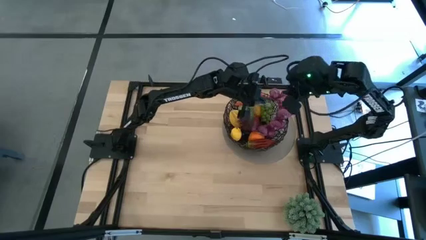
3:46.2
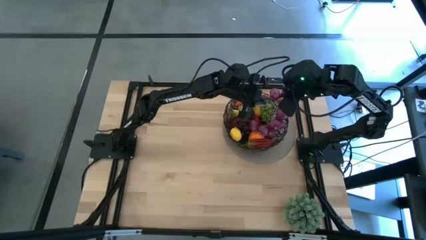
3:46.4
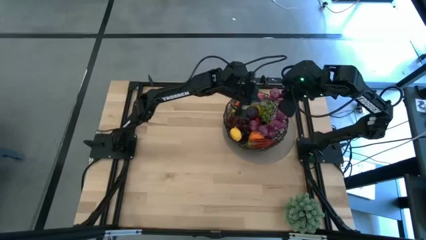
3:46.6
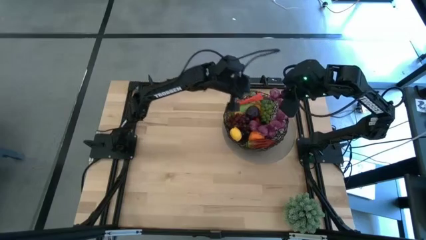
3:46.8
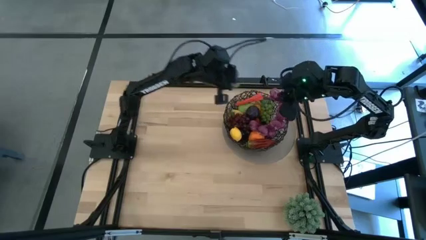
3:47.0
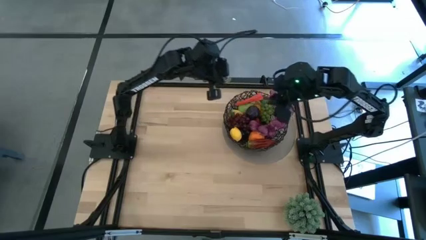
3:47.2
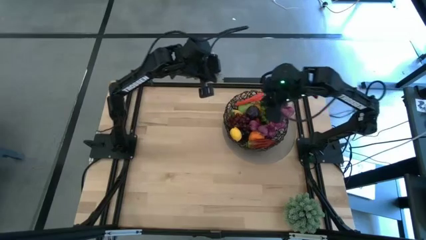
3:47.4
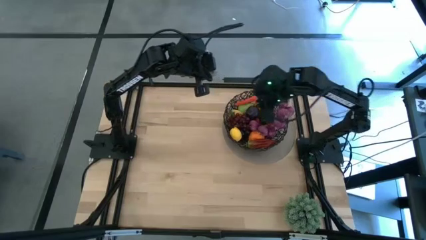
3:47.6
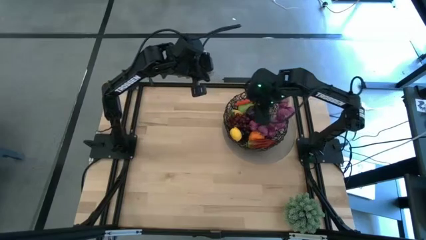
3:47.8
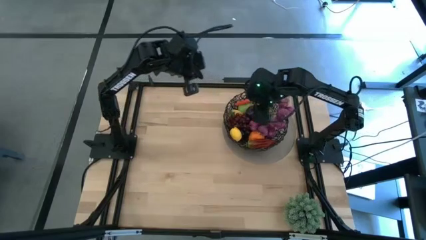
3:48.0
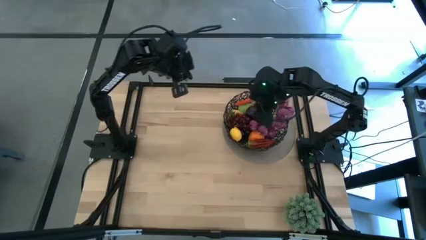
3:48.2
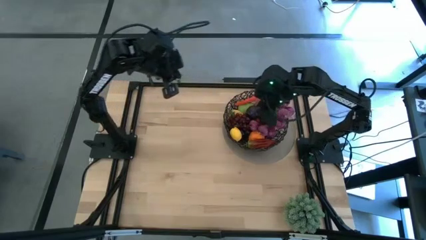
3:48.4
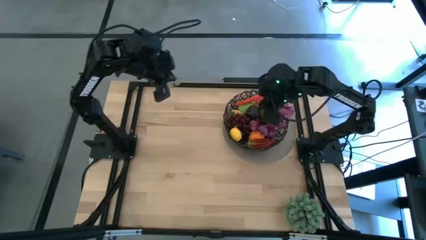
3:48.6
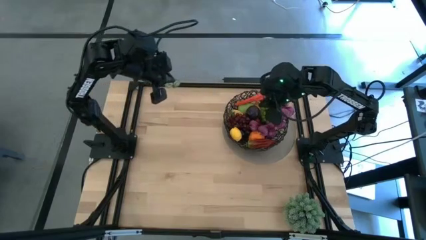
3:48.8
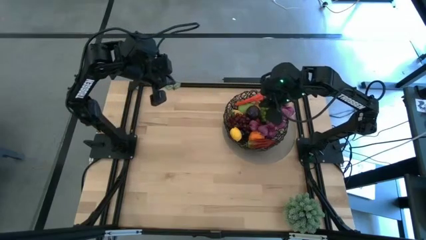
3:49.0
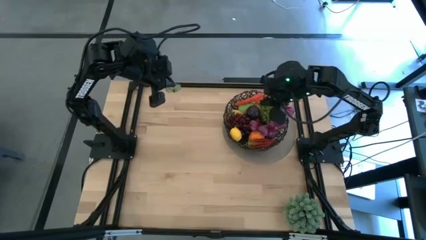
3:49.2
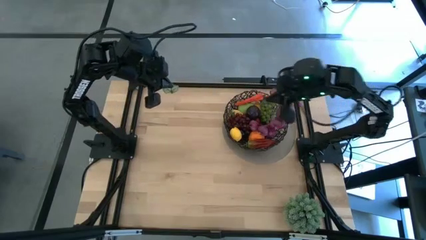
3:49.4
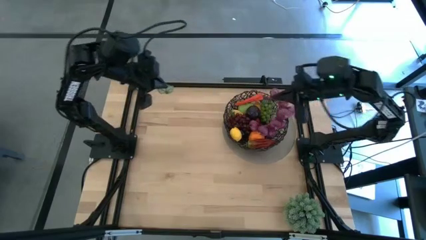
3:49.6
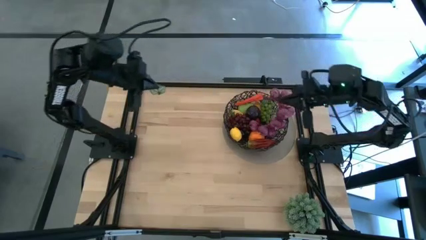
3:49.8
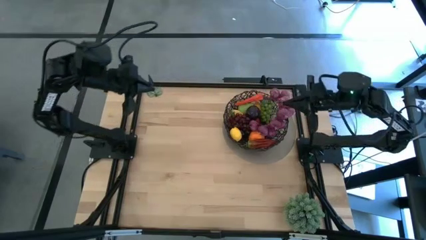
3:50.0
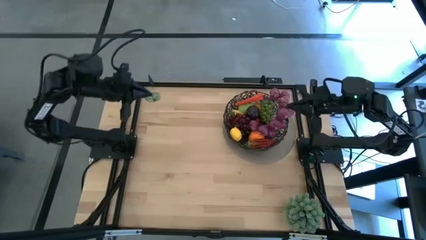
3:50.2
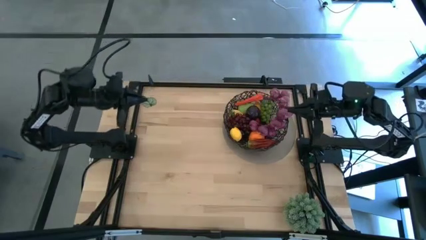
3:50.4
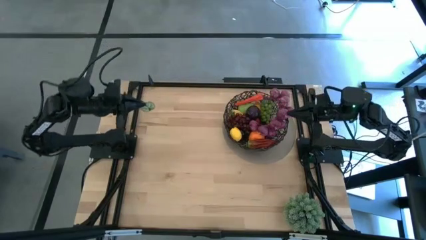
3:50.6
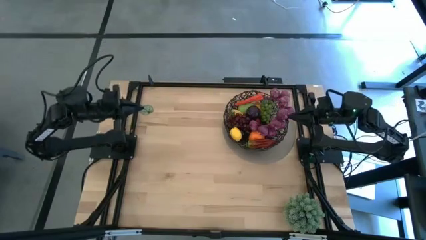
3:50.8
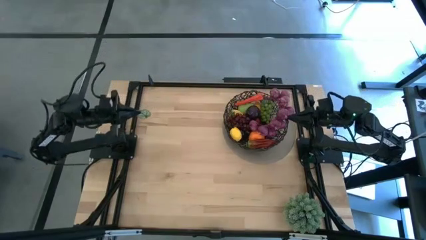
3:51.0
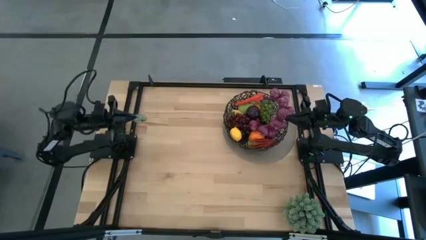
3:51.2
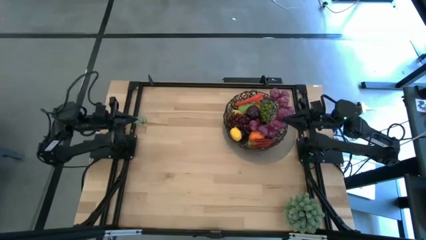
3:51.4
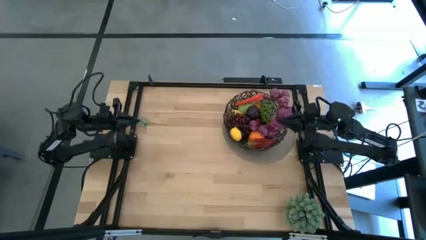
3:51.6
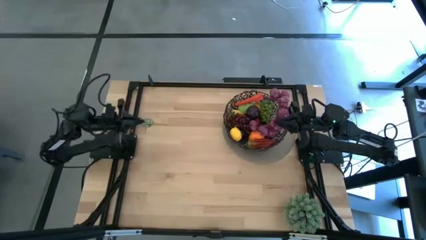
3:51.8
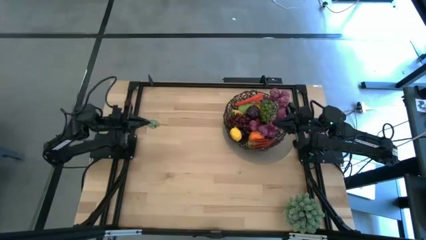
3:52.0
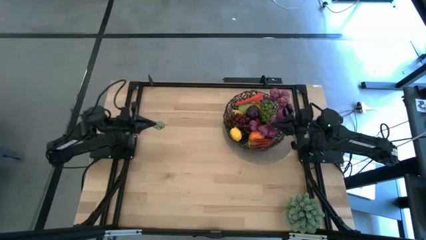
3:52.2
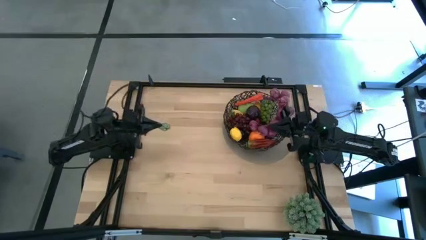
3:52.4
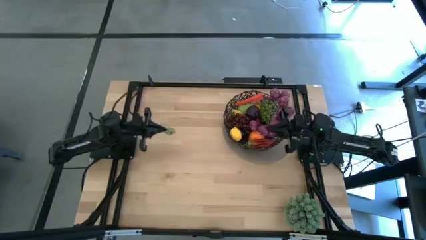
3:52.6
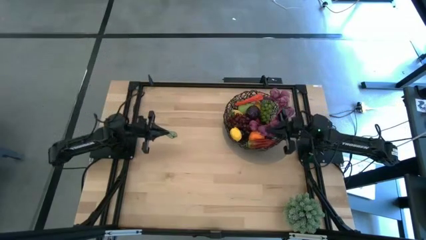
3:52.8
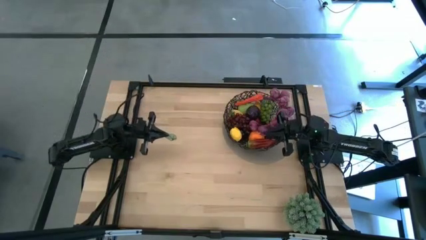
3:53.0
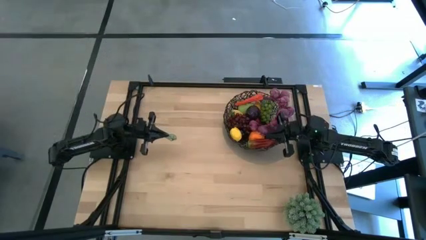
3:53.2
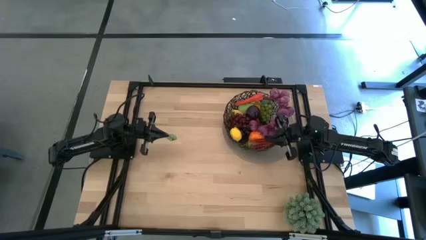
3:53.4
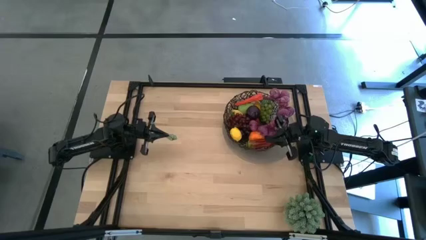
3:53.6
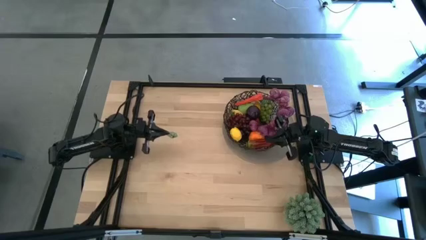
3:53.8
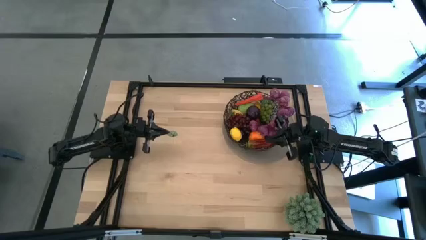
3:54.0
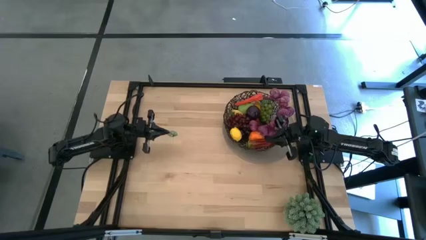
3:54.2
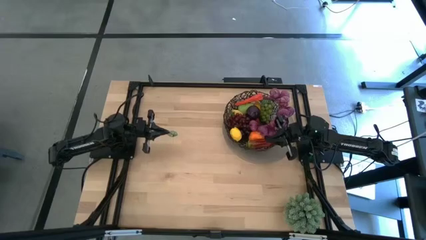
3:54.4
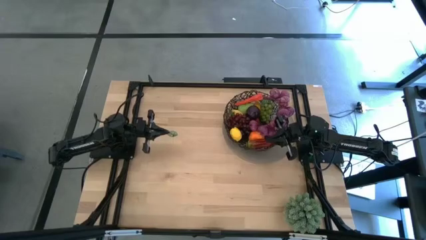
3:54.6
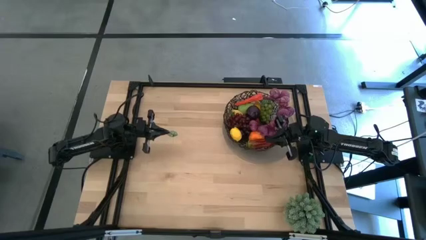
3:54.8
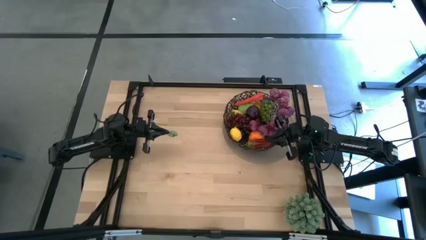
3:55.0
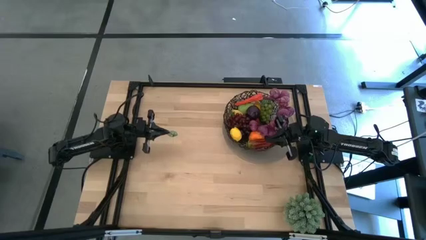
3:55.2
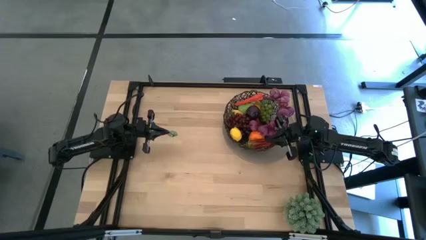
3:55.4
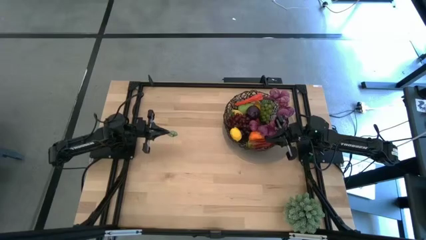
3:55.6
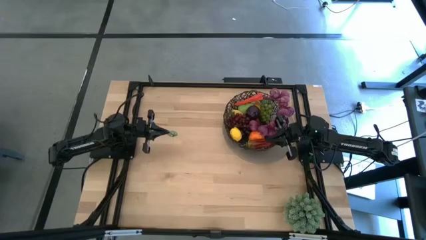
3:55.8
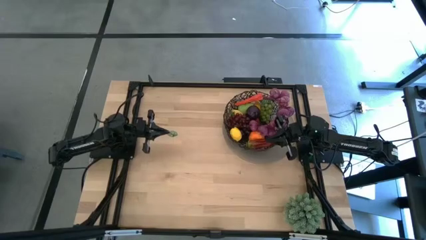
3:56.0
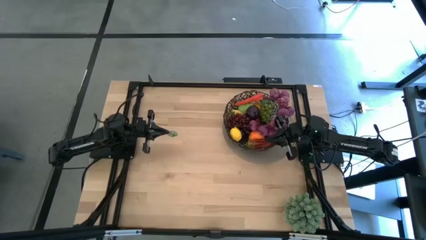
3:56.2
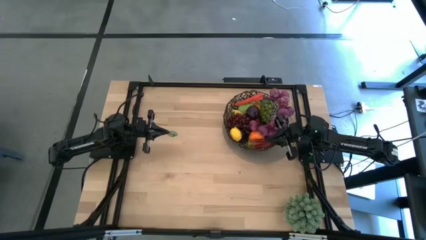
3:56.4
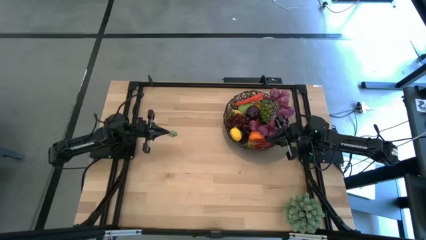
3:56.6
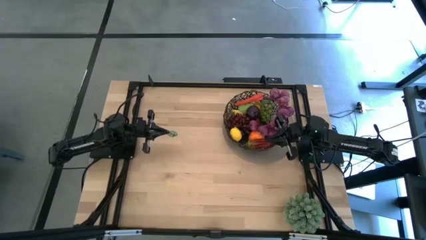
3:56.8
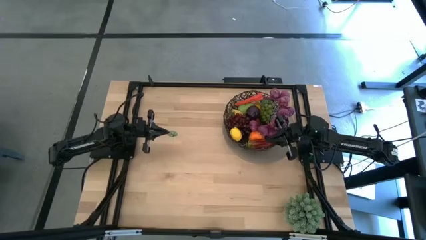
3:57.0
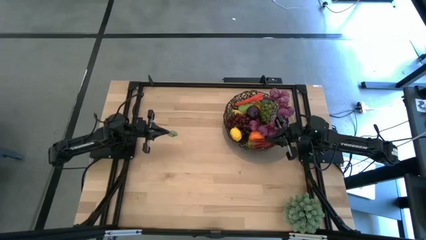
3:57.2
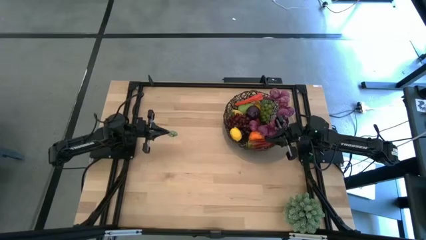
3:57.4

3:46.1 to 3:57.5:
Task: Build produce basket
Return to Home Position

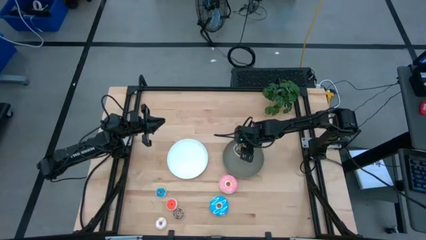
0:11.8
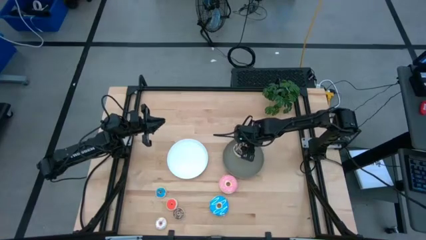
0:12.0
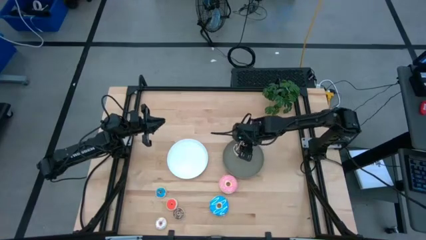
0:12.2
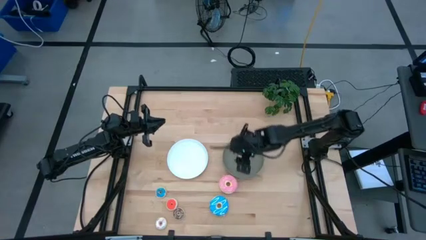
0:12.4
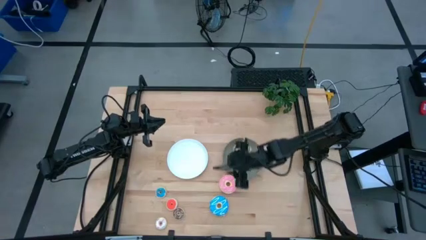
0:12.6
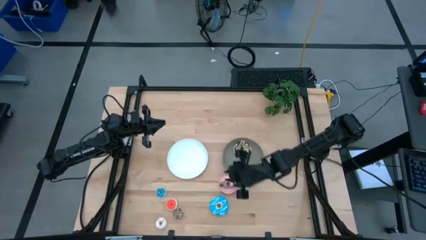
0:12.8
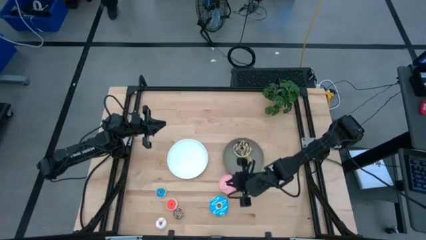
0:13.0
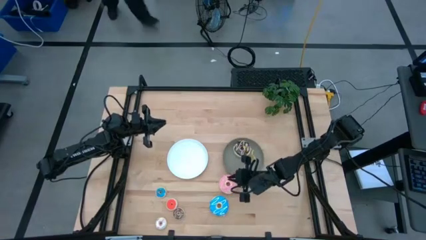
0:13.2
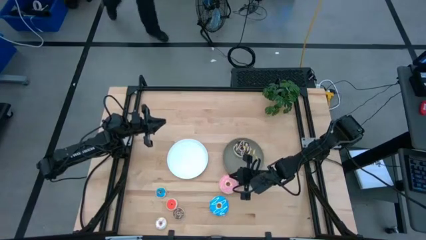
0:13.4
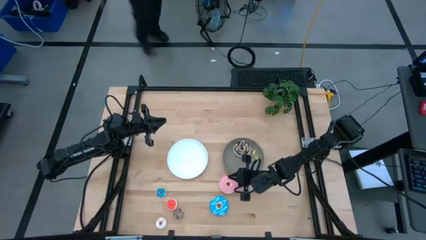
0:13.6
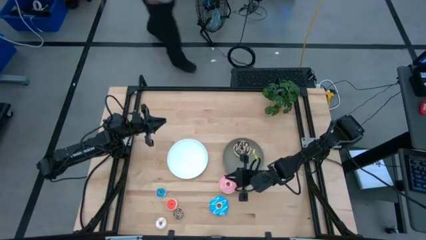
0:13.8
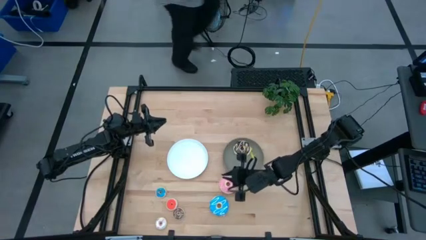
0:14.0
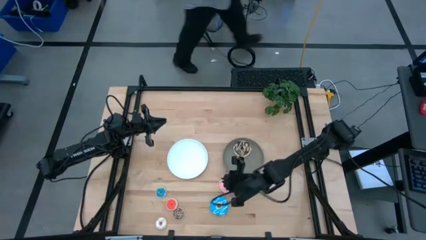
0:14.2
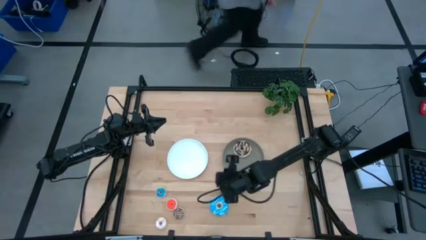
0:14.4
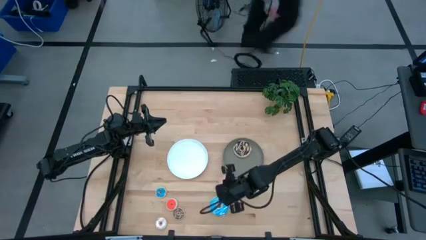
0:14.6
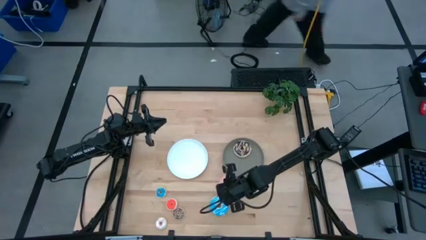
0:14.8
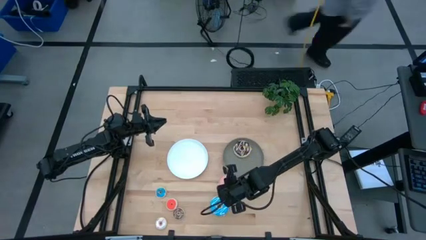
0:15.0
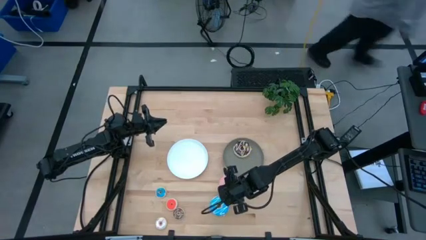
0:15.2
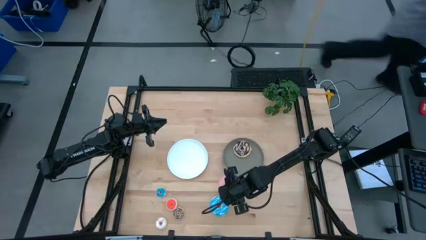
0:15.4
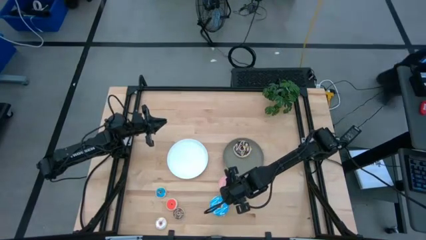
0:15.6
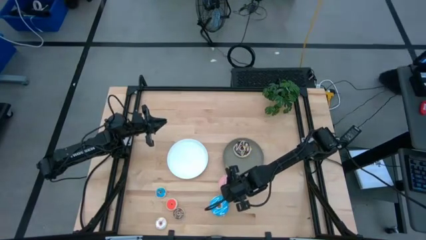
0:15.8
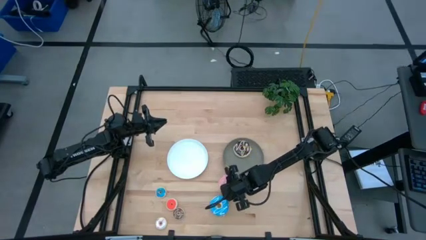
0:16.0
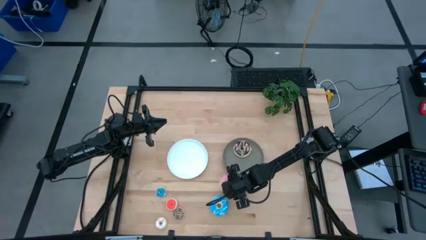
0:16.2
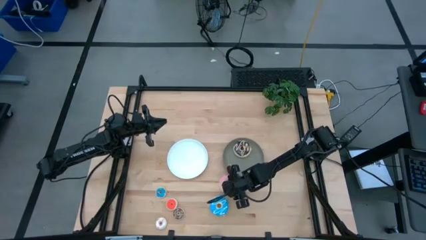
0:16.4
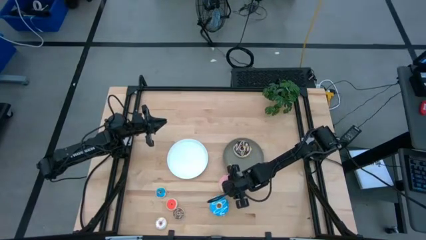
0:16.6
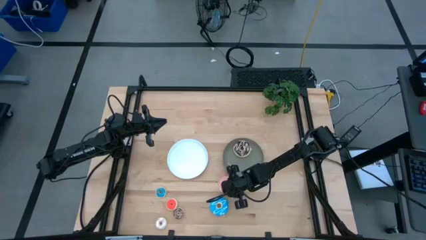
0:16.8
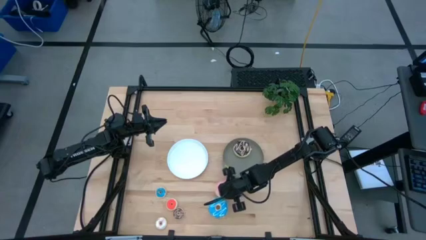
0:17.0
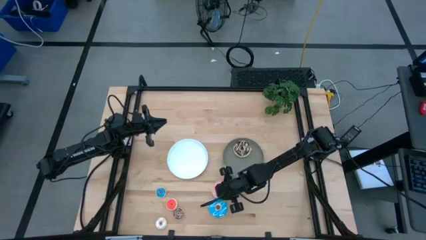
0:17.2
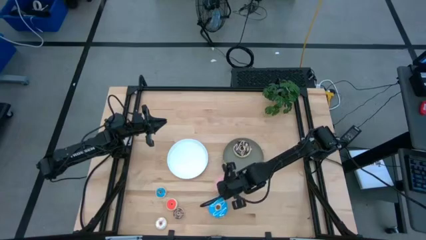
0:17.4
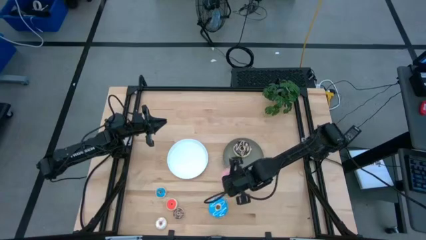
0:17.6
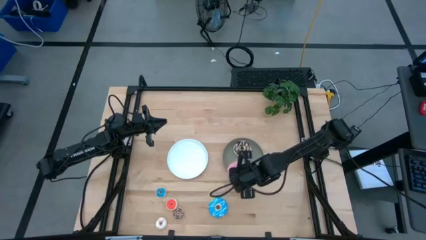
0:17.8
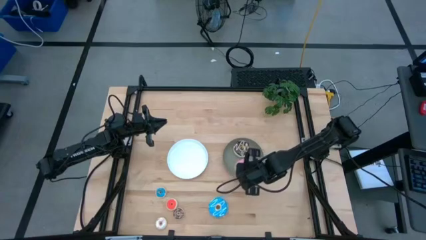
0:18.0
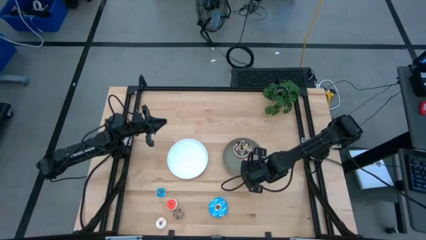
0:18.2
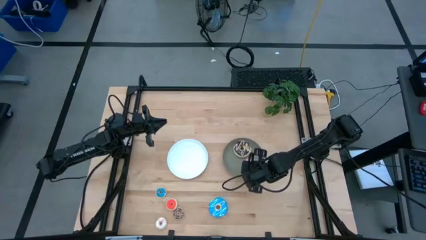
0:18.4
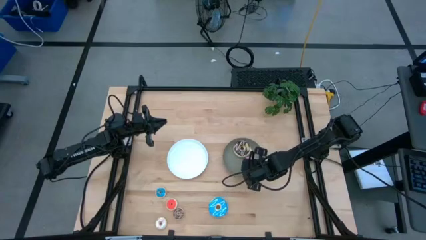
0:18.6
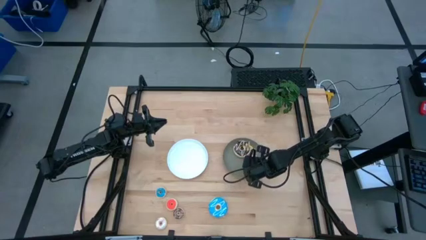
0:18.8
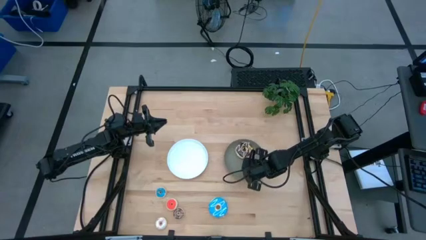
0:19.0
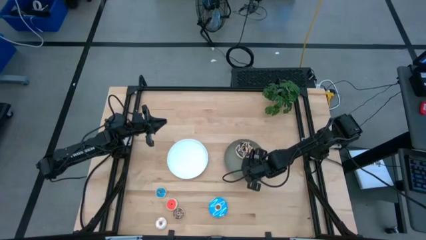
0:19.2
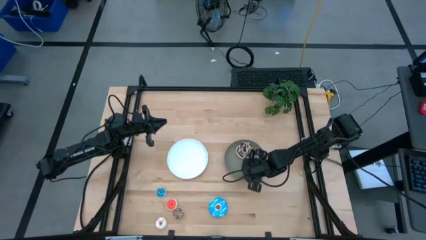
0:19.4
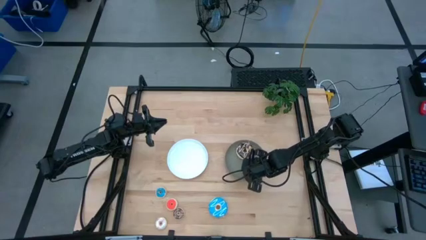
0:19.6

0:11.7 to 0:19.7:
Task: Pick & Place donuts
Put the large pink donut on the gray plate
